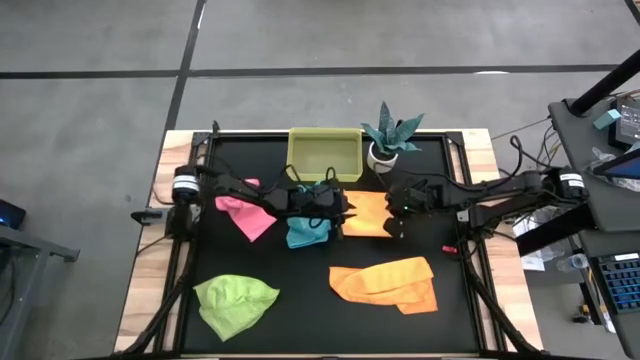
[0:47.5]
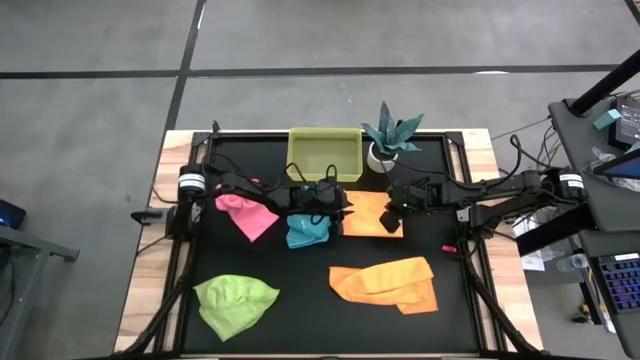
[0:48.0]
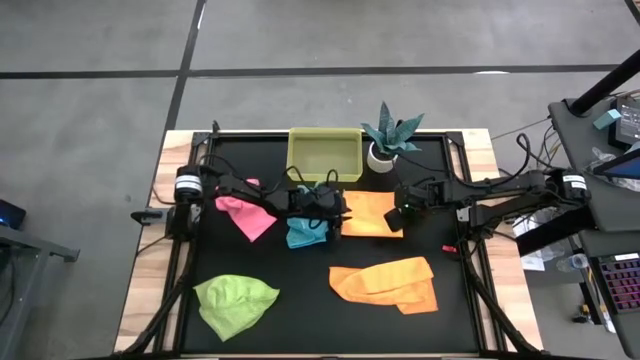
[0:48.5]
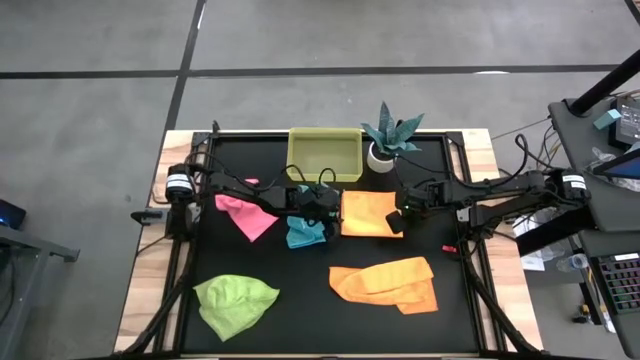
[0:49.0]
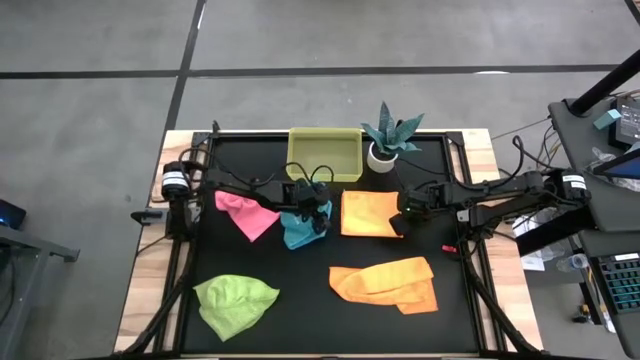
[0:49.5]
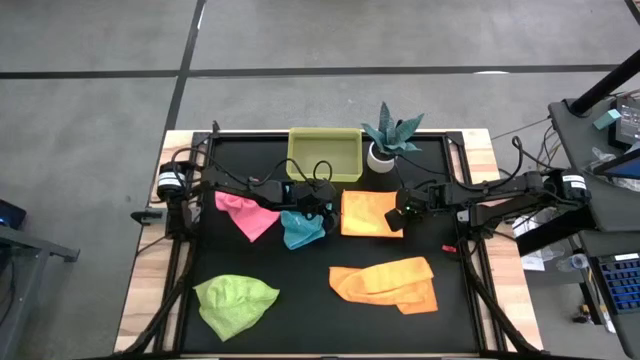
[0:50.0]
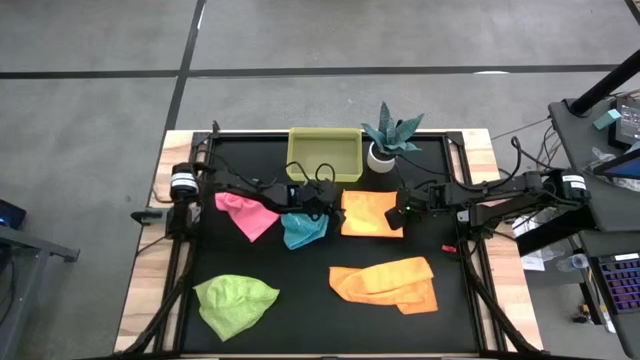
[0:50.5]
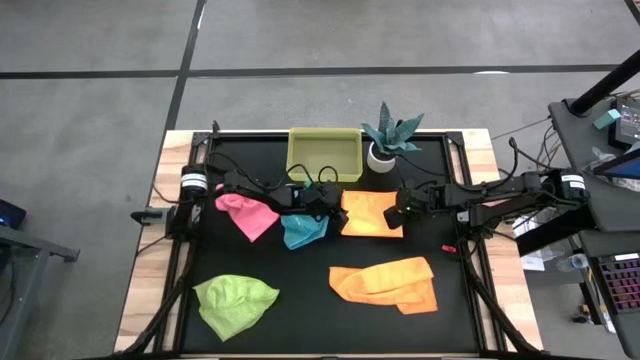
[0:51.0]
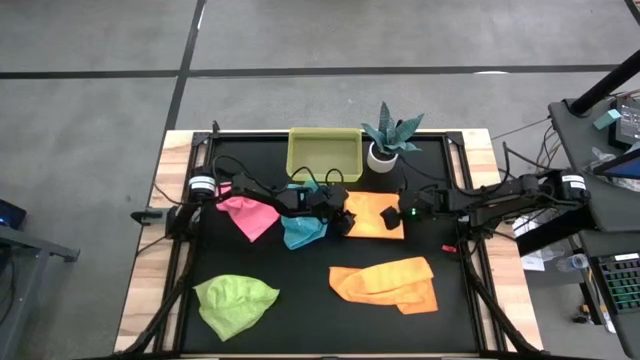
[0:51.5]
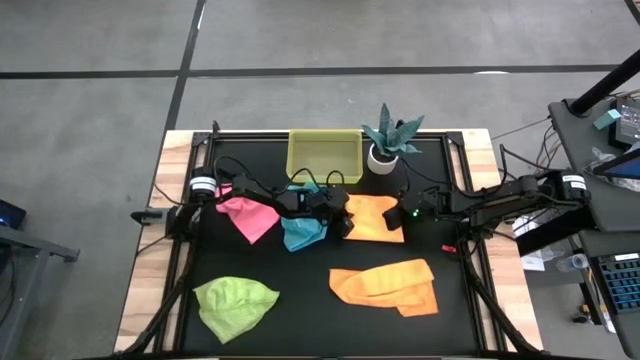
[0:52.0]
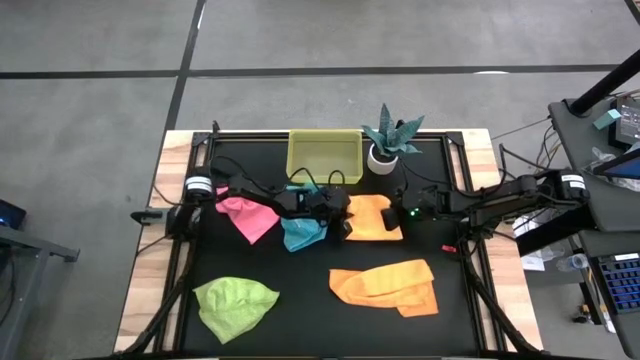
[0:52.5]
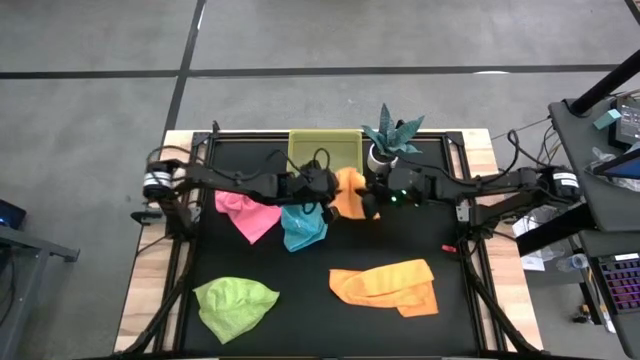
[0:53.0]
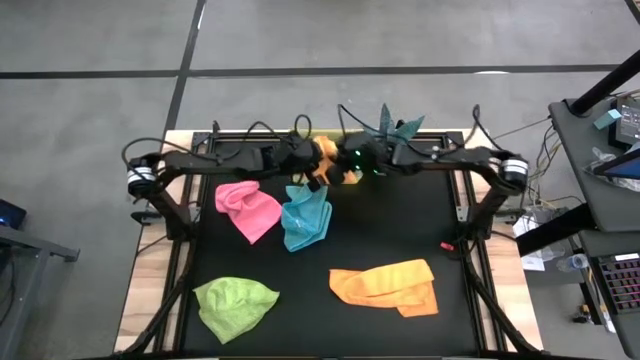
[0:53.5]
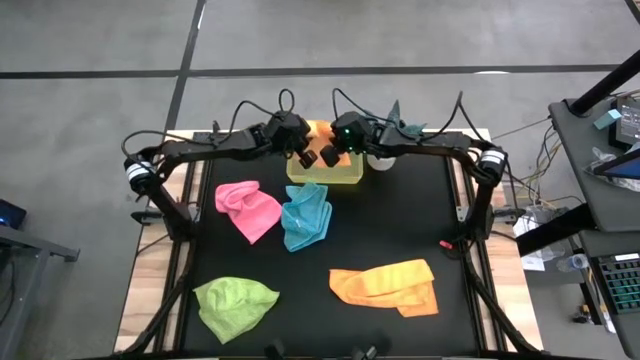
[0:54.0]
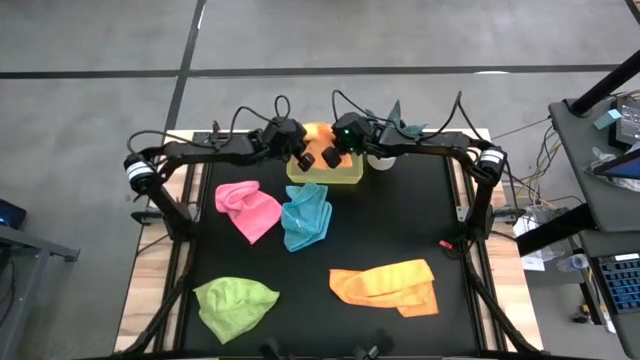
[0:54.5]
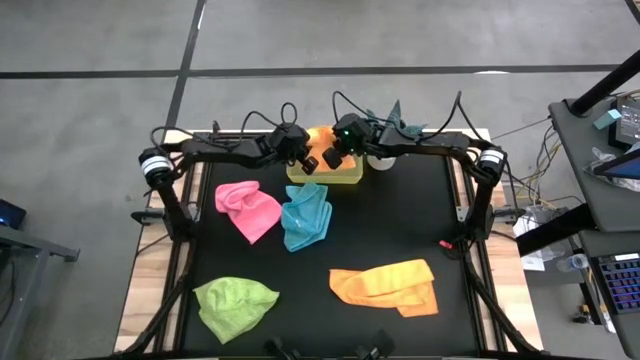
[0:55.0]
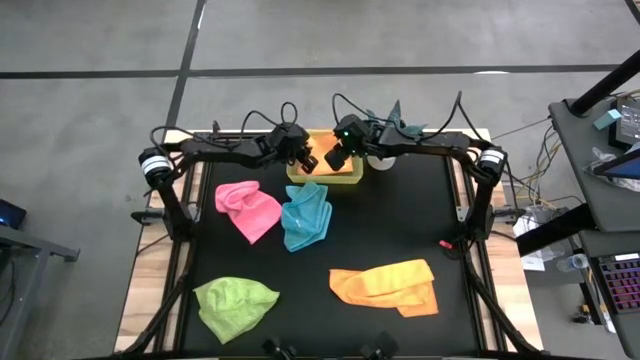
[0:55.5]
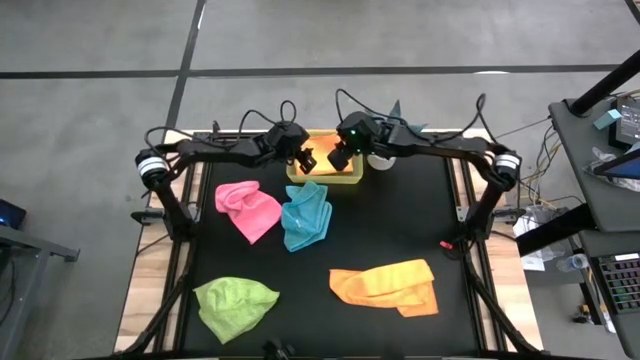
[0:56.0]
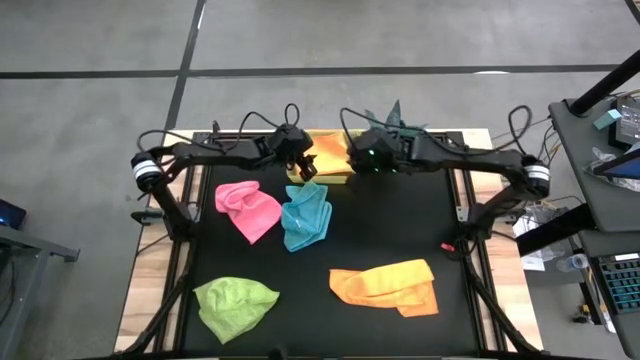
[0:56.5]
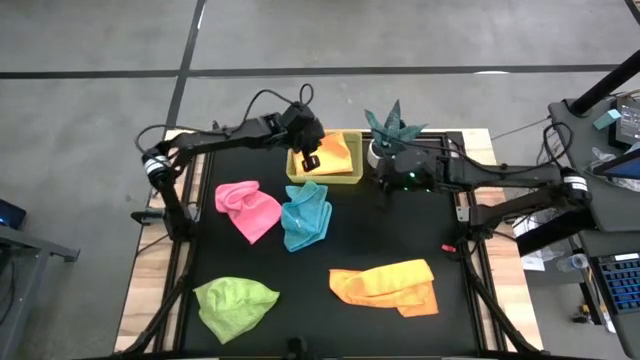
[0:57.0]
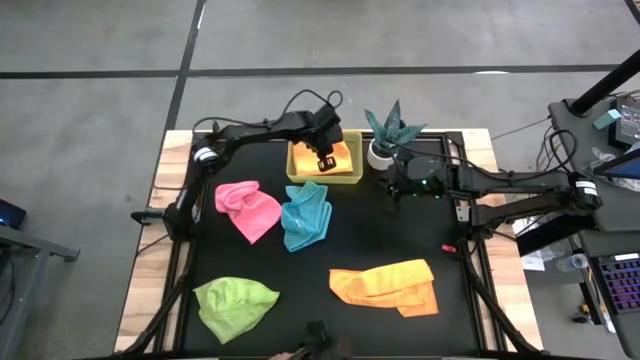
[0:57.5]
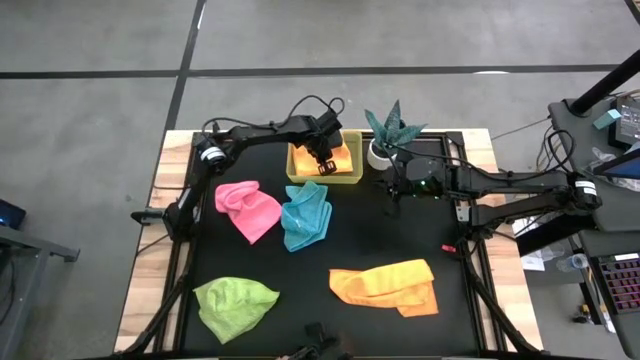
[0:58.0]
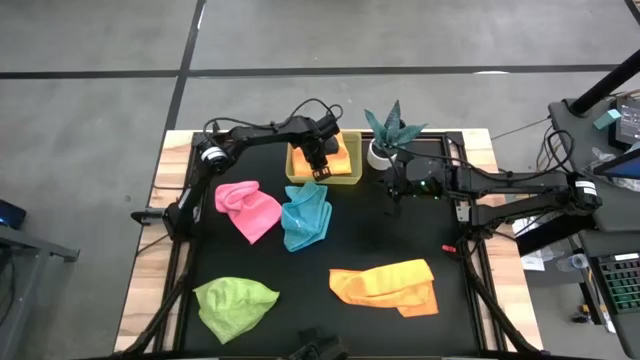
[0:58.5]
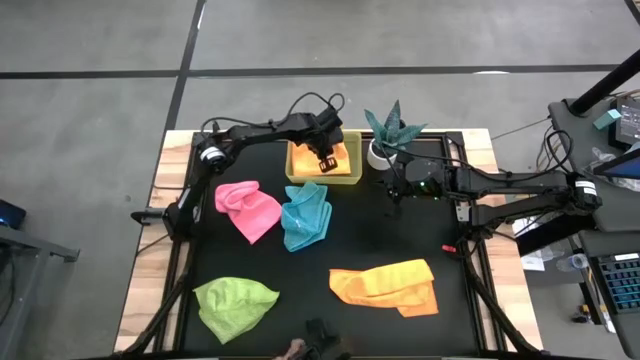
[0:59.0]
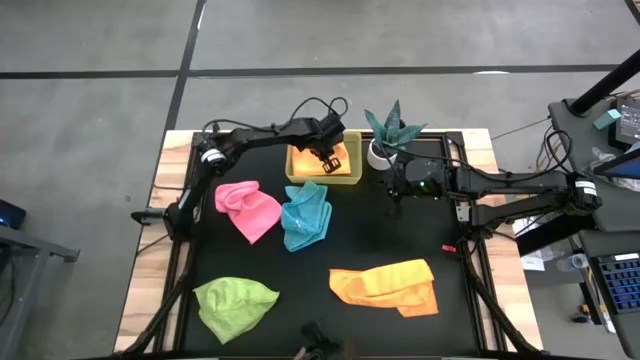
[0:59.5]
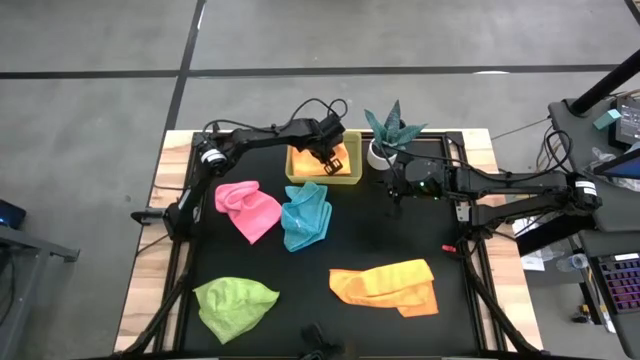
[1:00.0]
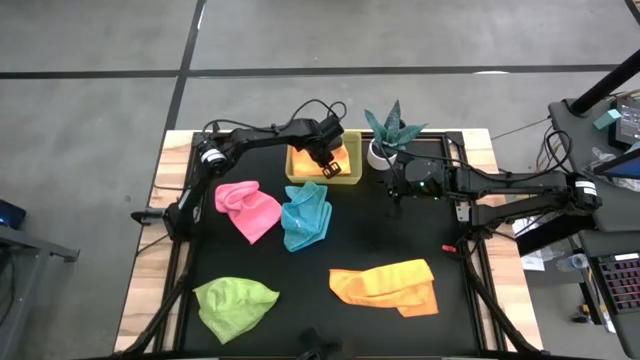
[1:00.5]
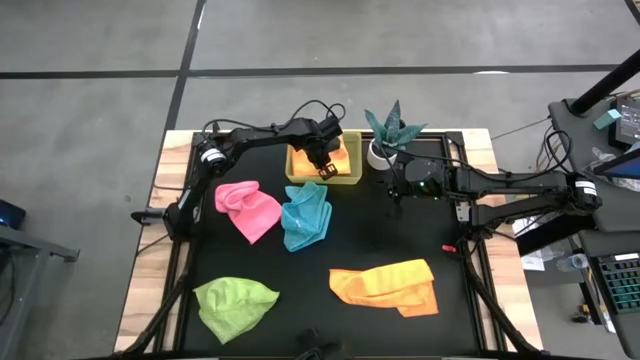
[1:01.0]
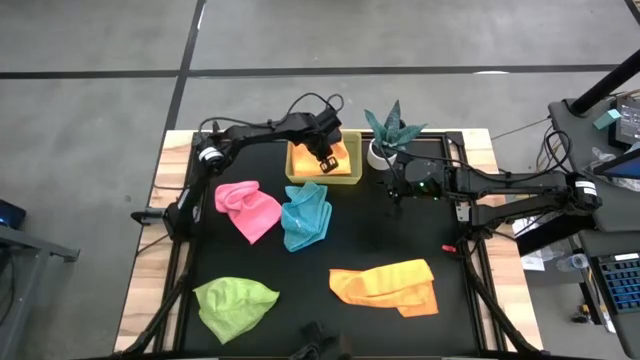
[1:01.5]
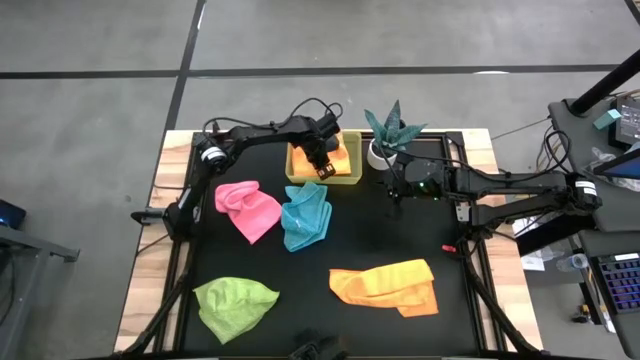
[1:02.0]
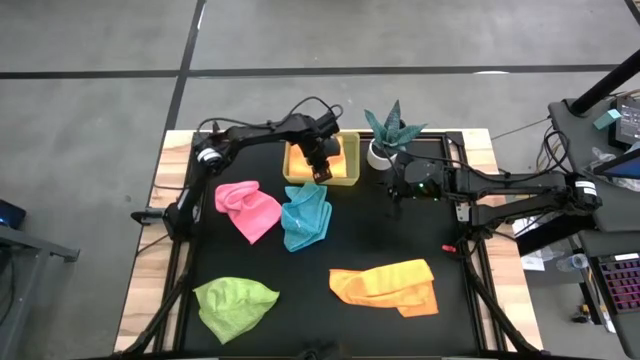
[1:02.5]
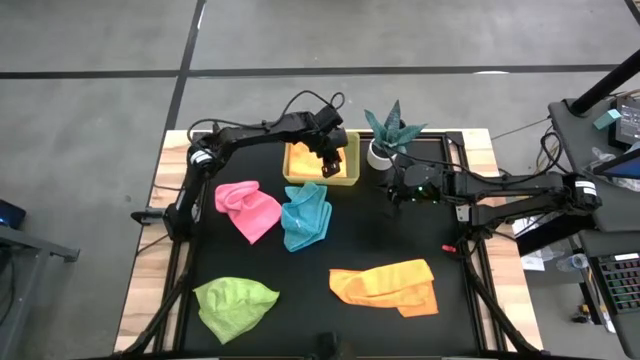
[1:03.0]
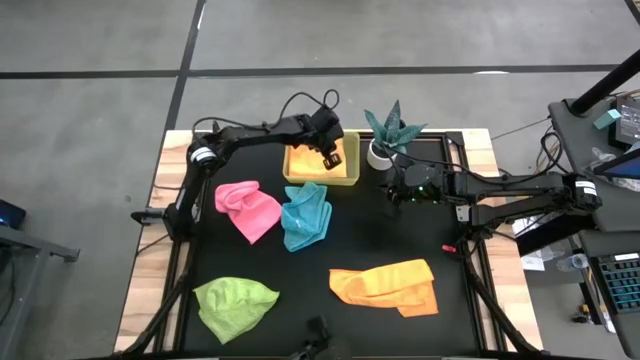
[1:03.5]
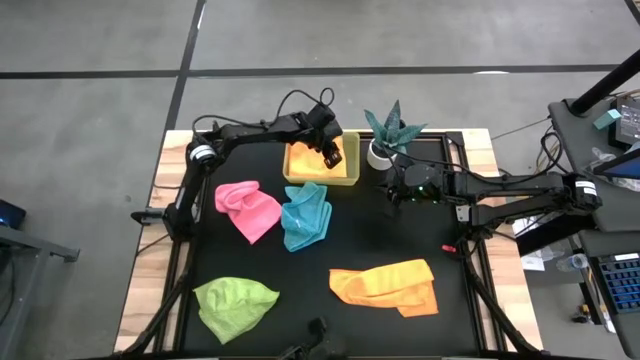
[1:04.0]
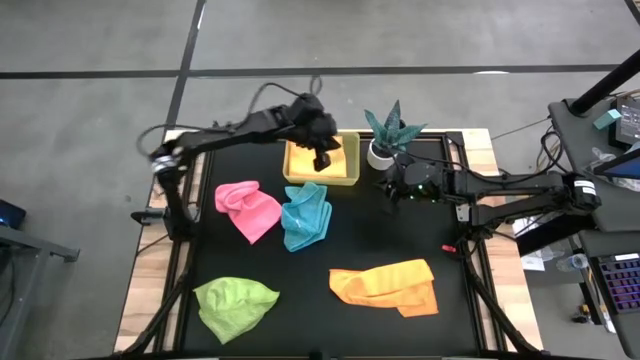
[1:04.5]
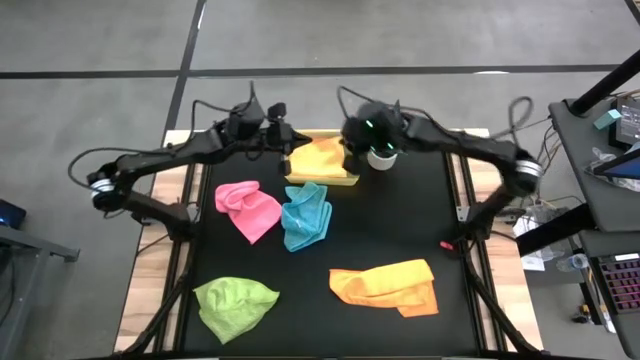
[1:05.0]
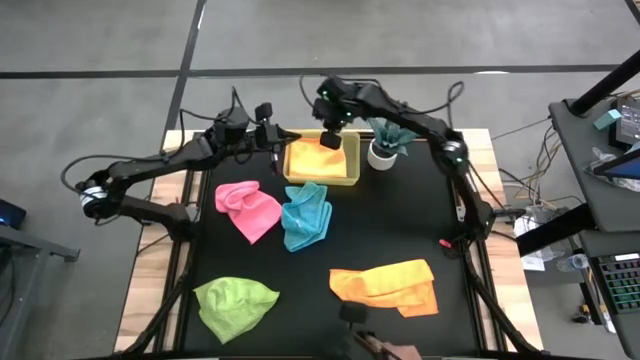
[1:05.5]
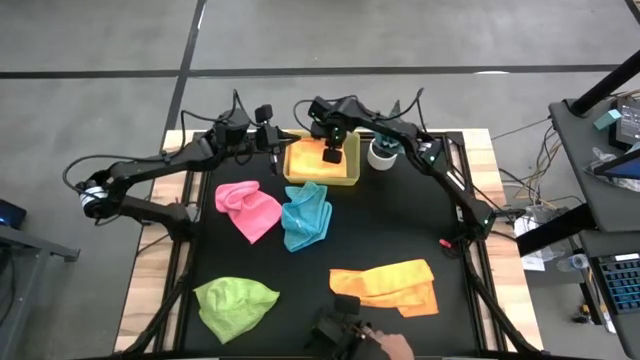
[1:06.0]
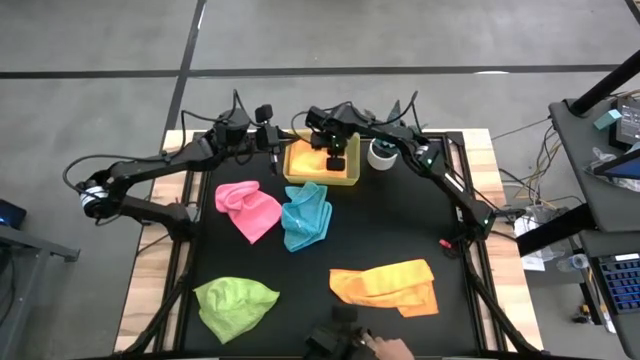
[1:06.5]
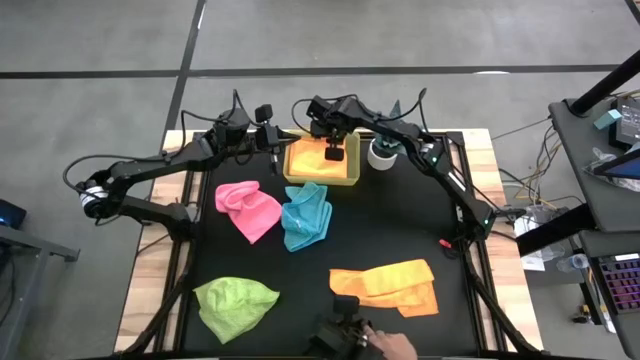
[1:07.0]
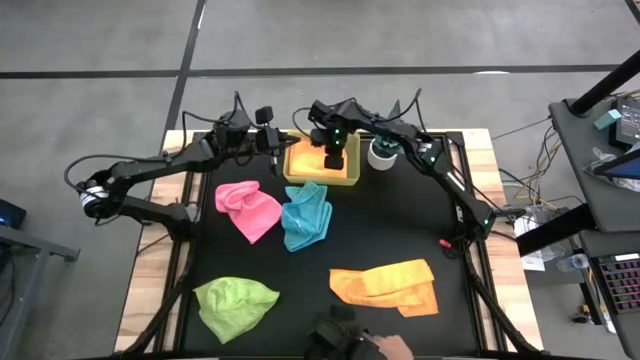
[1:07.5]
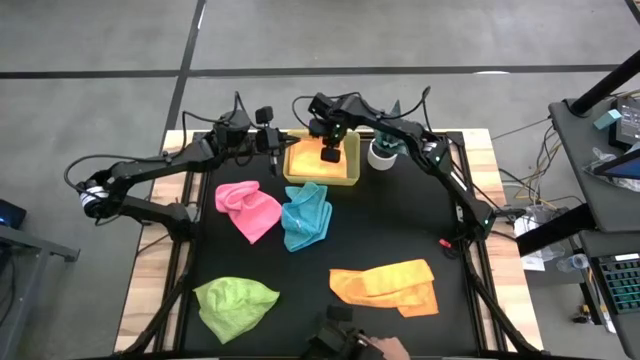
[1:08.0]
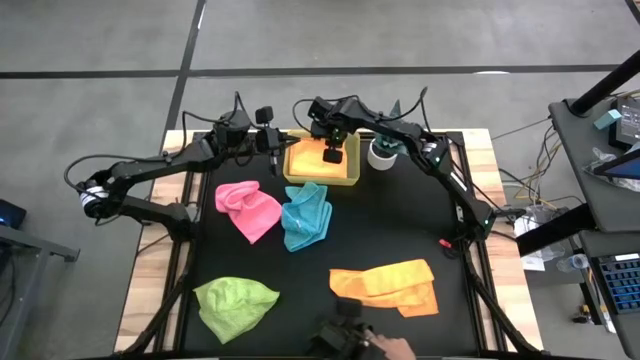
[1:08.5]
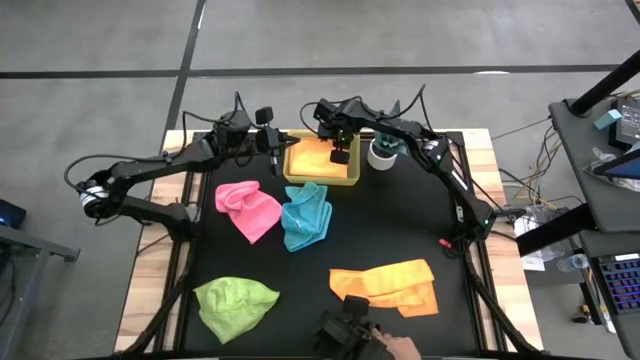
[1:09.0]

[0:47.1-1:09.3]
Task: Fold microfiber towels
Put the top orange microfiber cloth into the yellow bin
